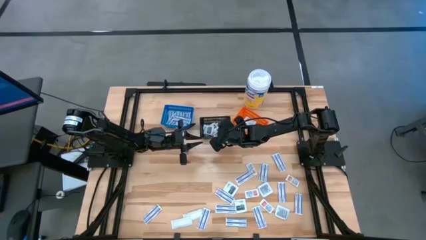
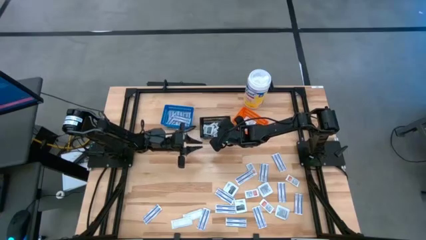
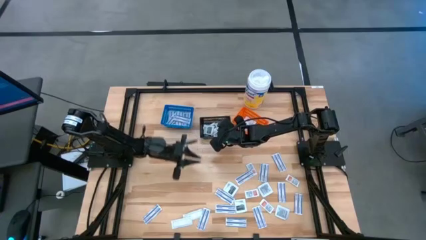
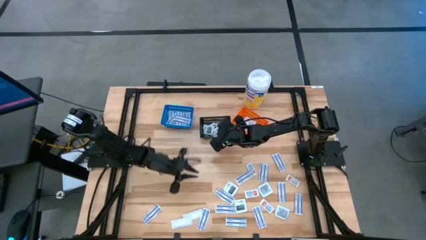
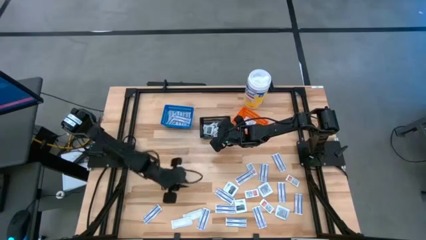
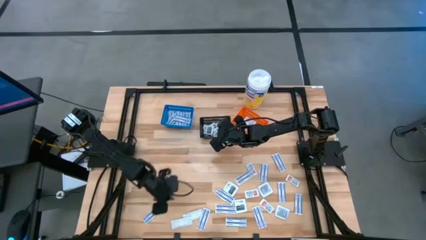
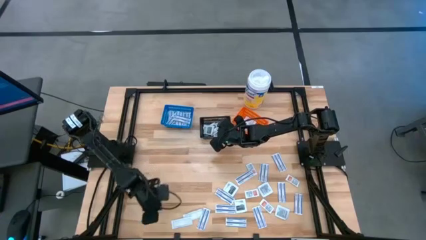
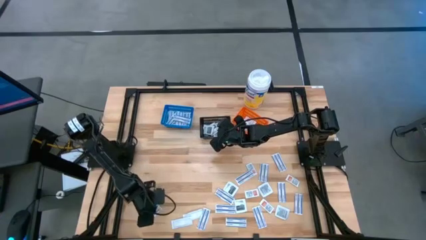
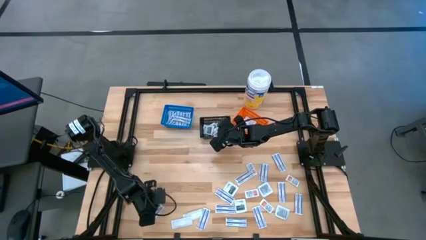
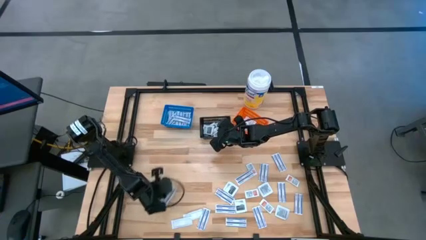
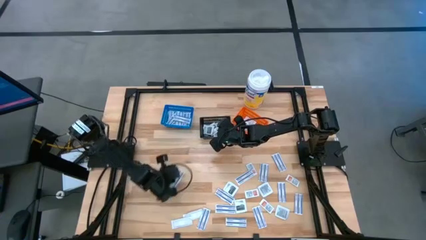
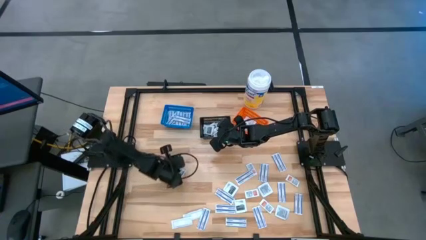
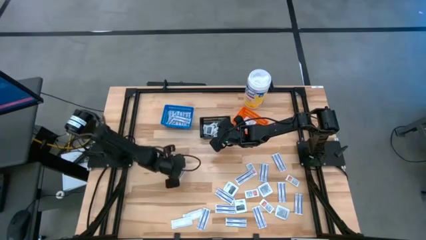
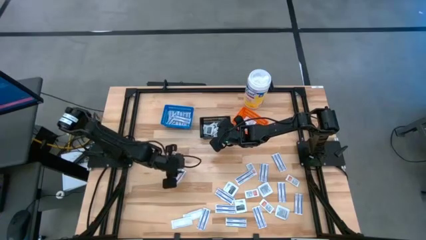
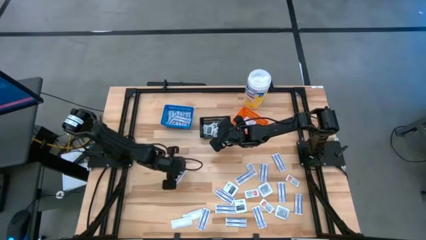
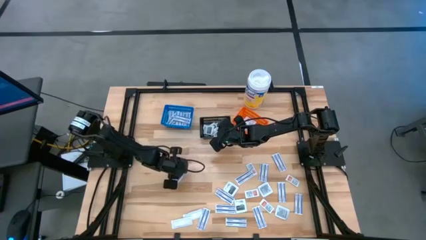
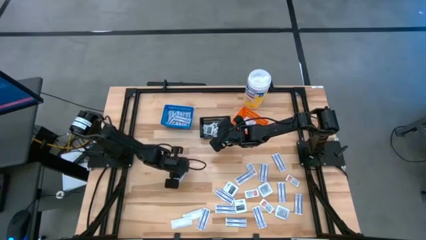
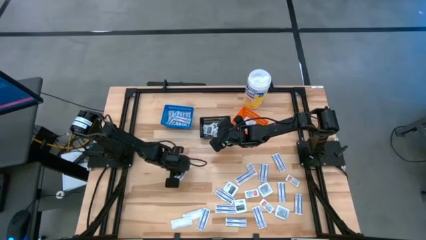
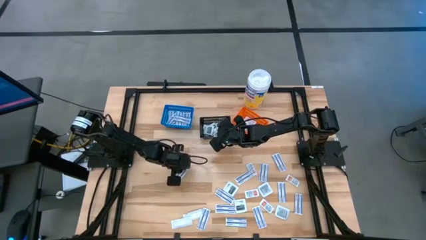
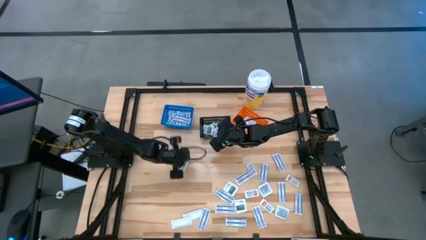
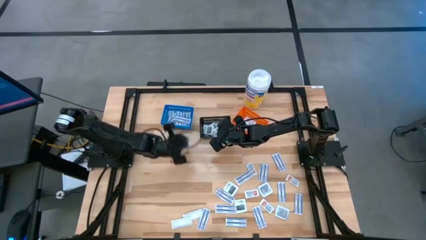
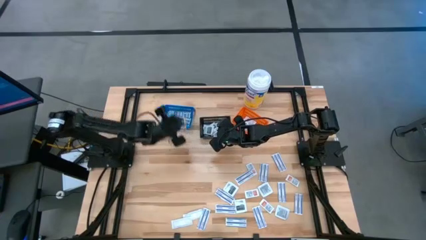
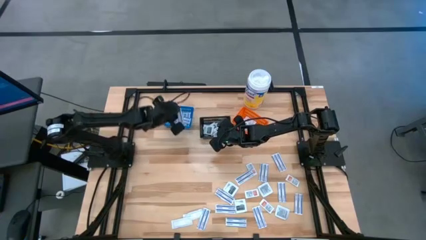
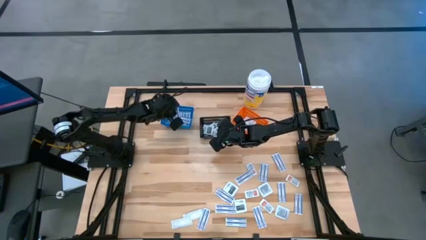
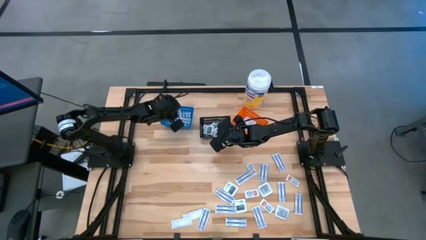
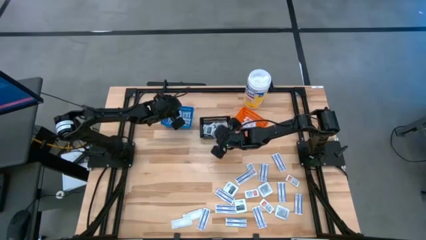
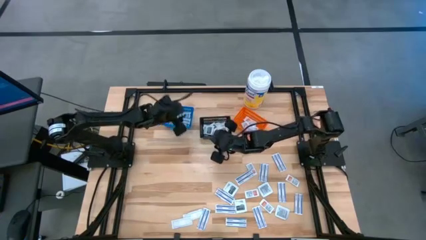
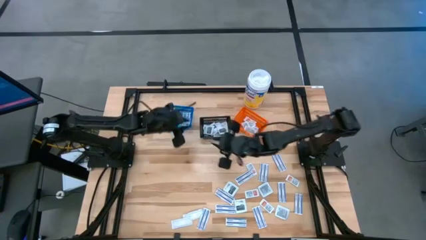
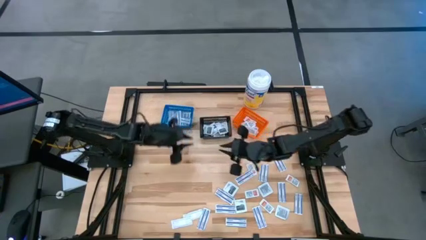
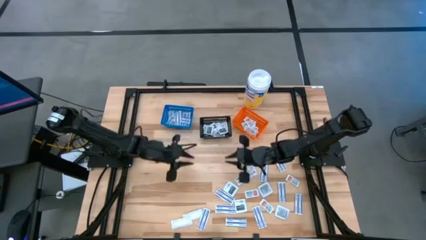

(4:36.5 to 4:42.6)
Task: Pick & Place First Aid Supplies
Put the bandage into the blue container

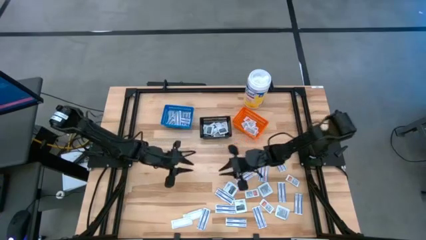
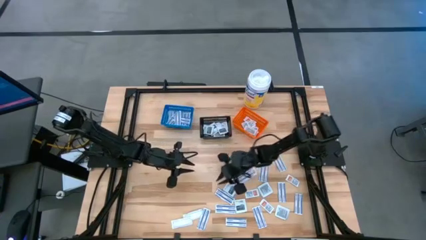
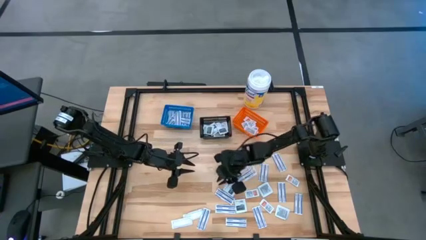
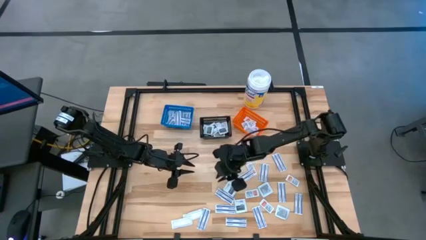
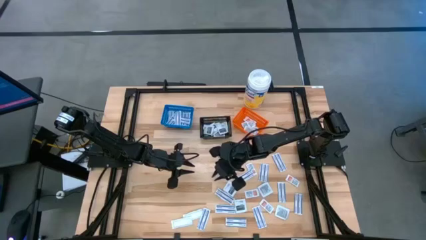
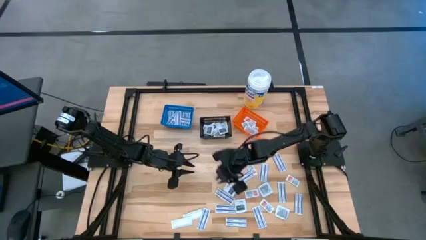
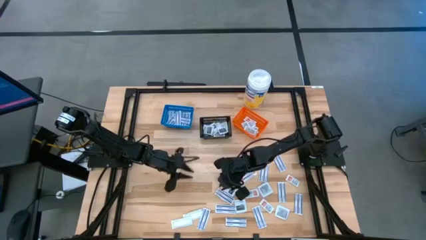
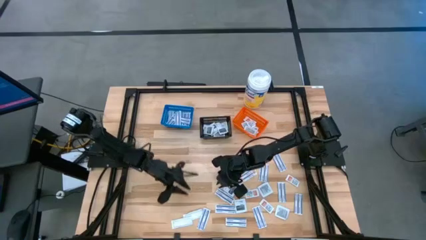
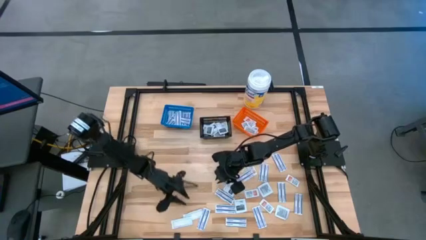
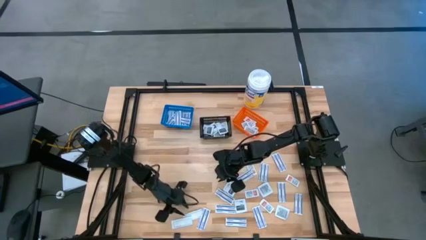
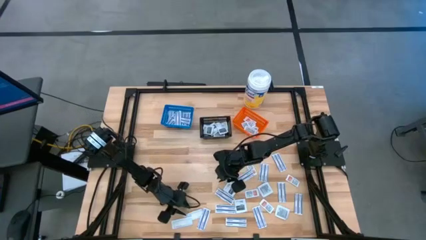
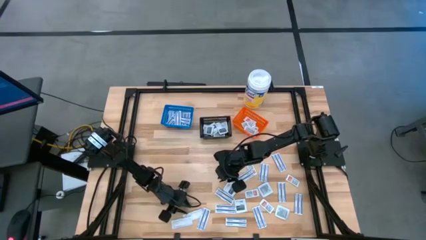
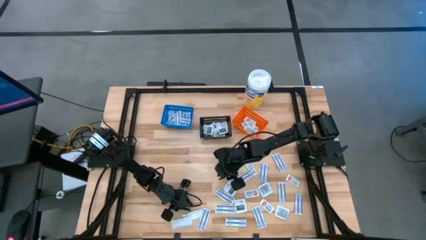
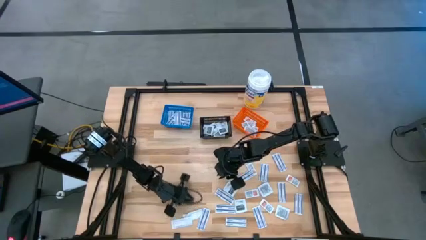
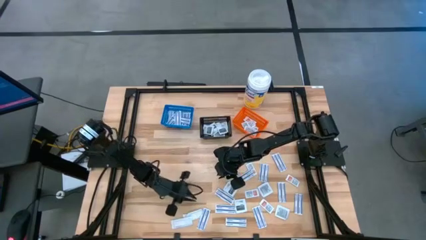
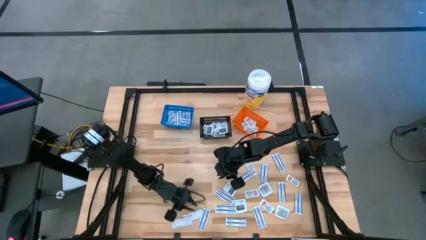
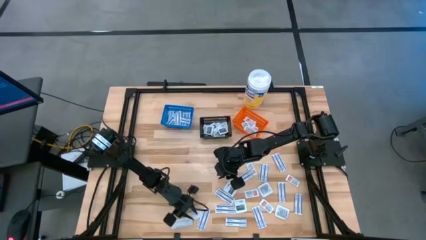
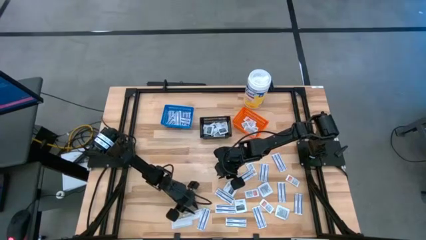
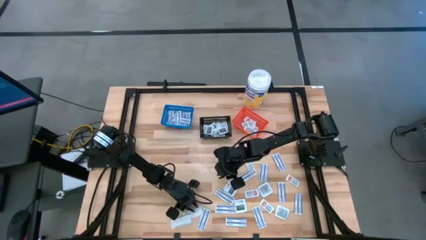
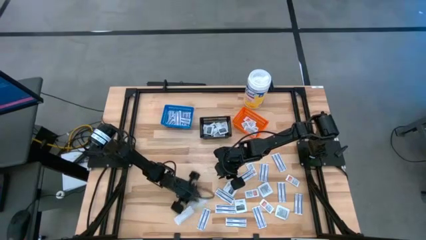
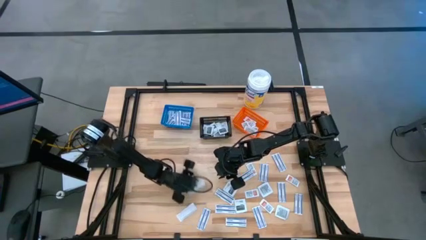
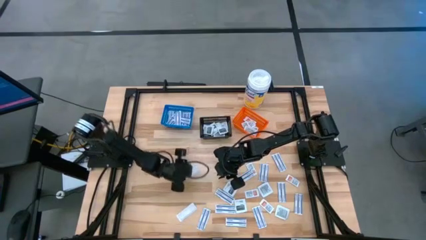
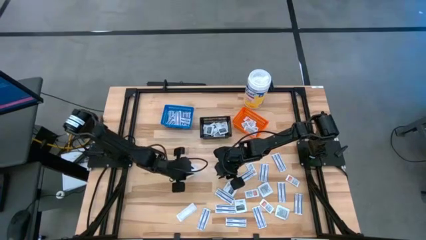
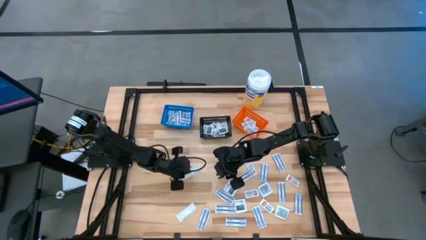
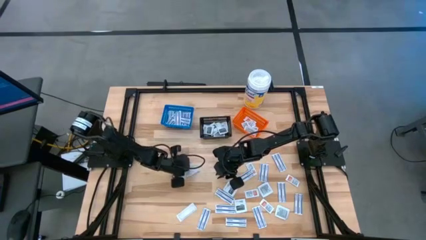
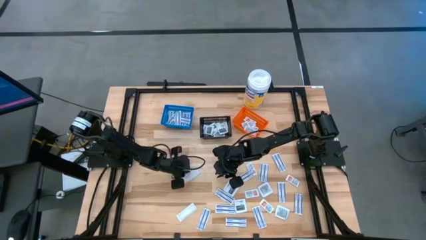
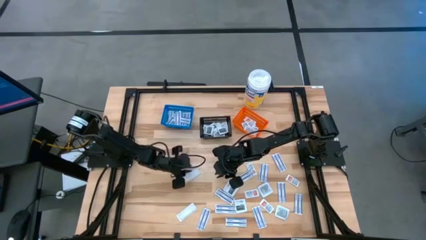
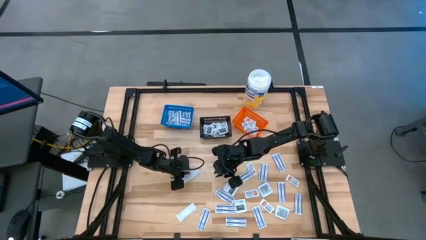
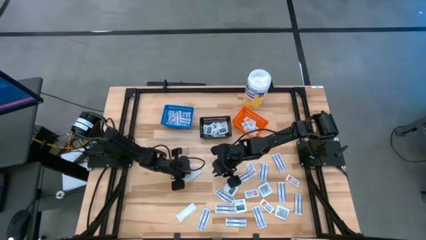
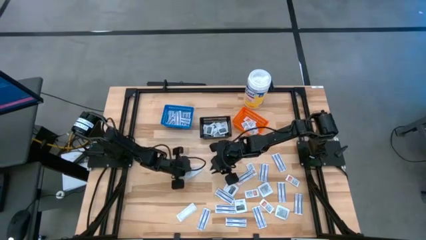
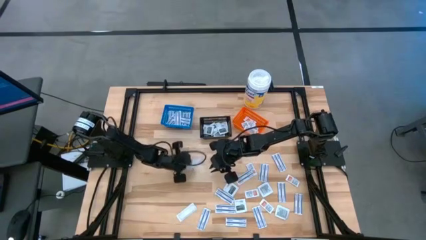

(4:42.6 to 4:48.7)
Put the bandage into the blue container

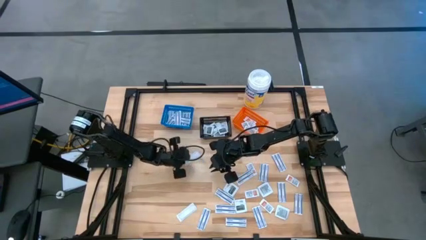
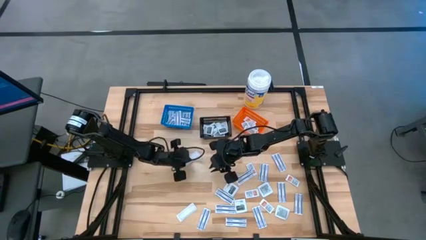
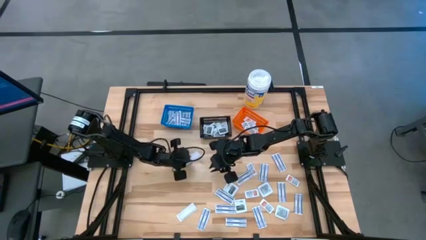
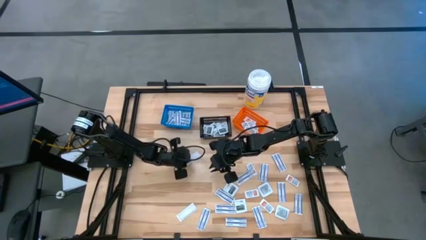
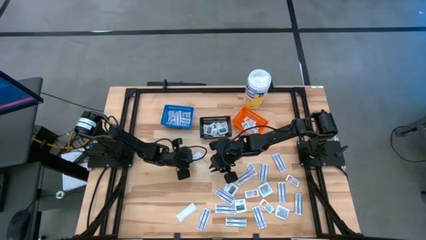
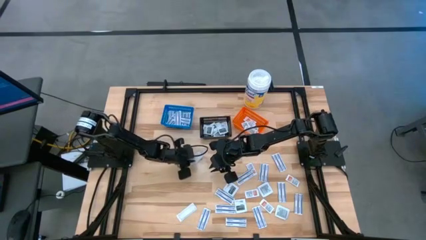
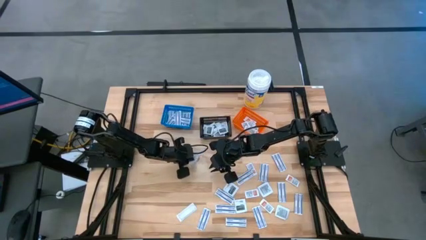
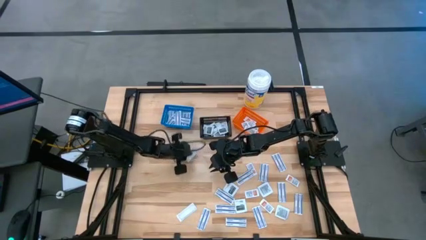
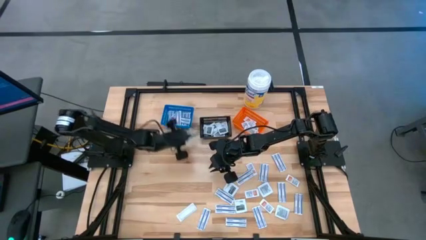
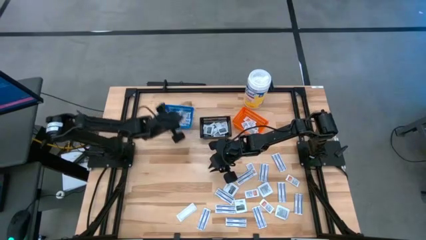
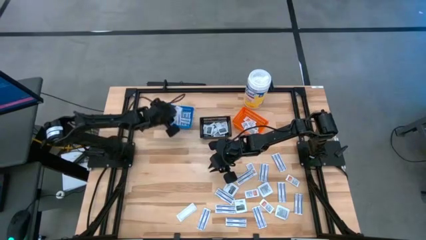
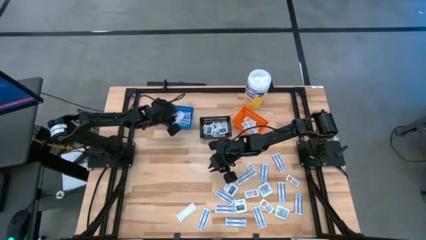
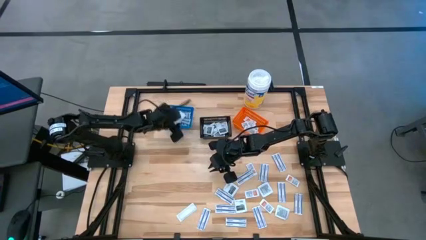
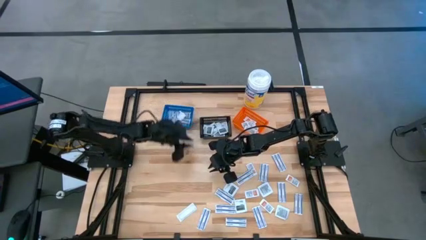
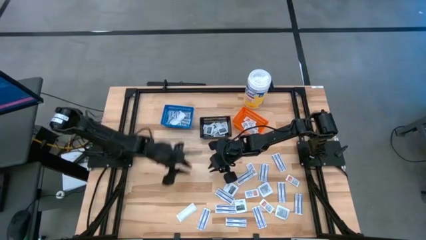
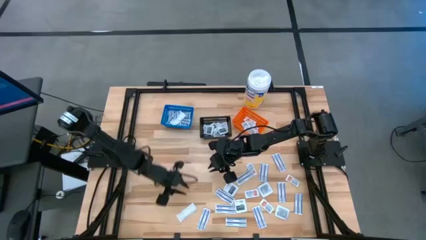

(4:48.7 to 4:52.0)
Put the bandage into the blue container

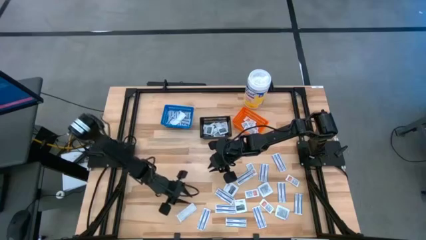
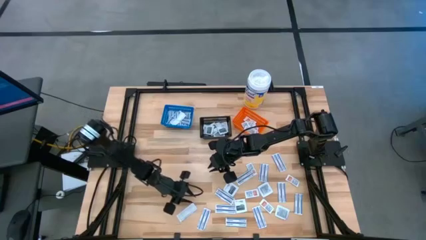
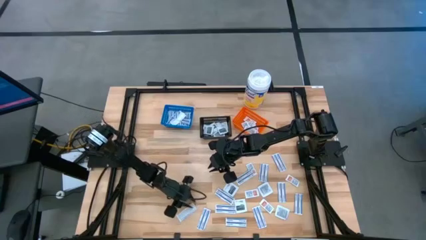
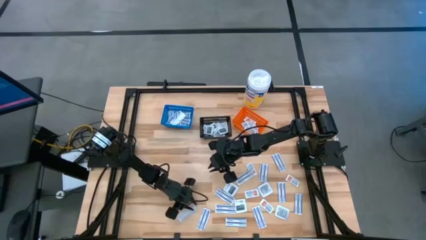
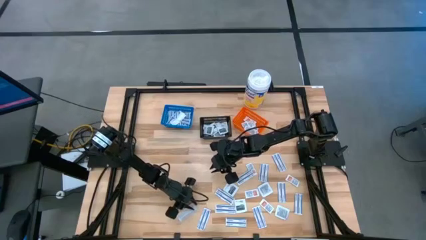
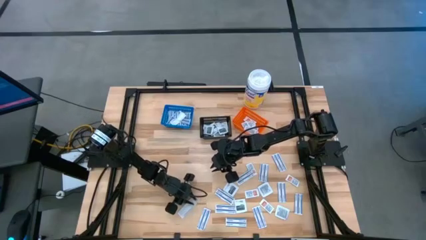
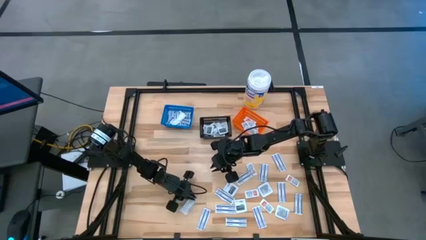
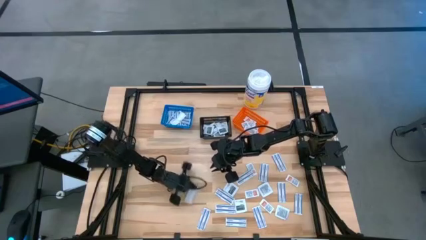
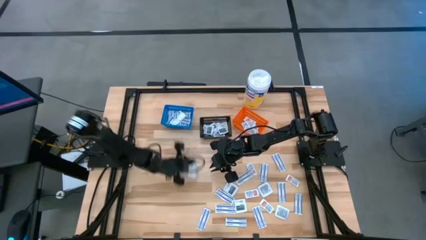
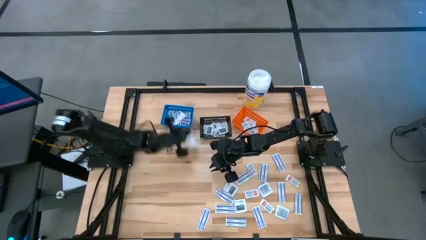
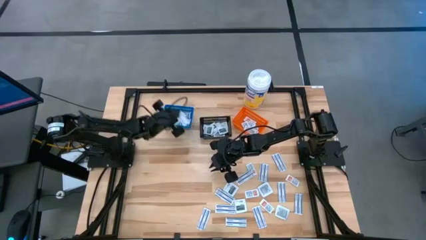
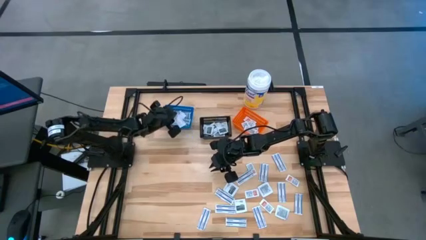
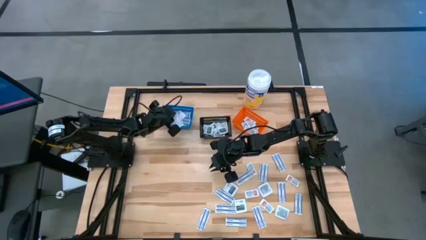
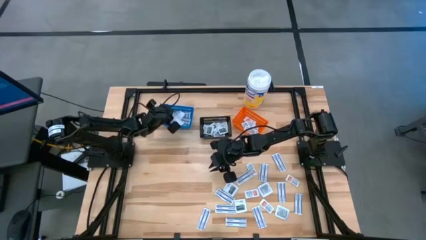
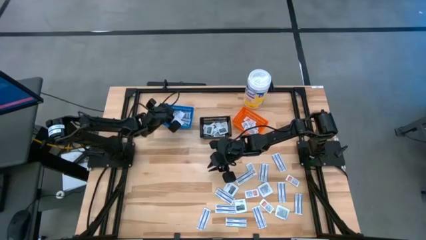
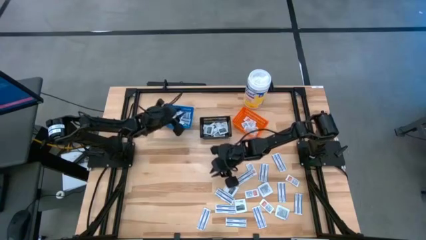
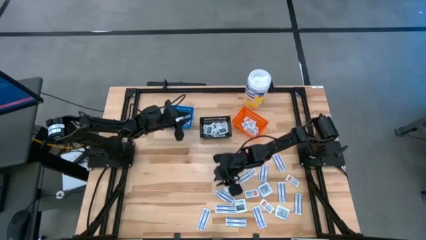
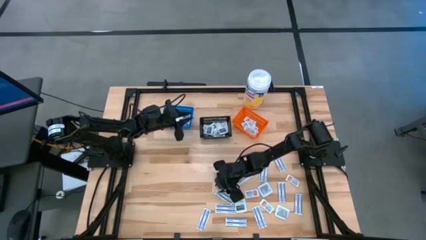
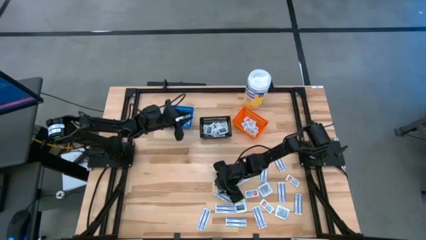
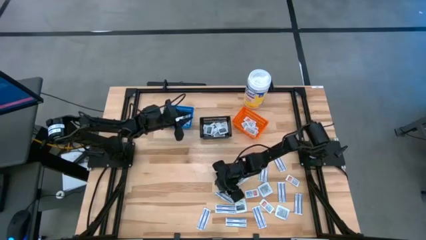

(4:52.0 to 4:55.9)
Put the bandage into the blue container
